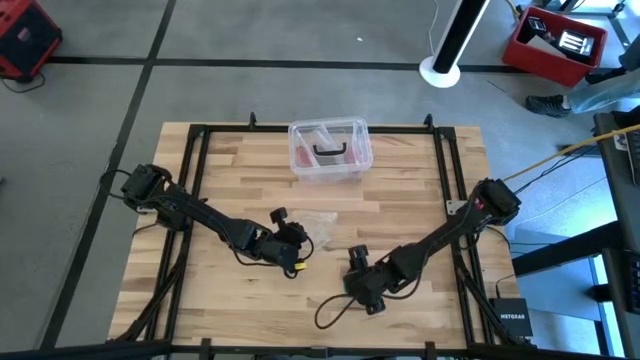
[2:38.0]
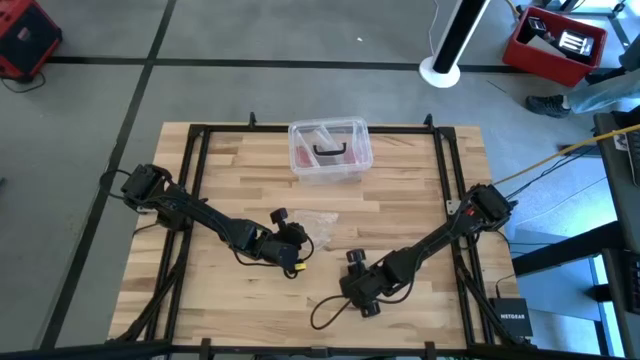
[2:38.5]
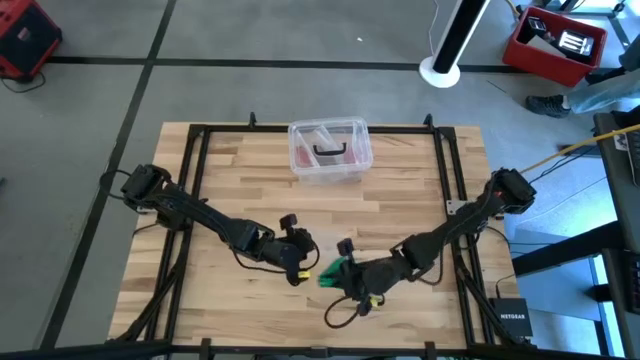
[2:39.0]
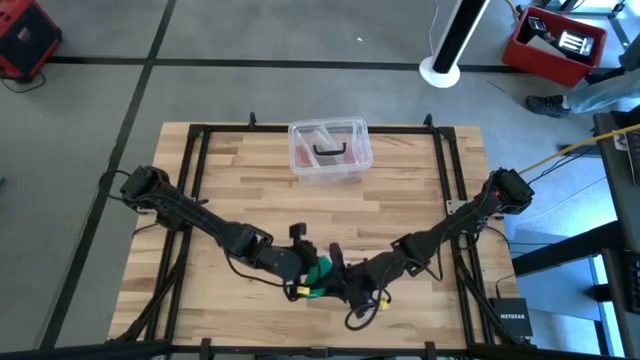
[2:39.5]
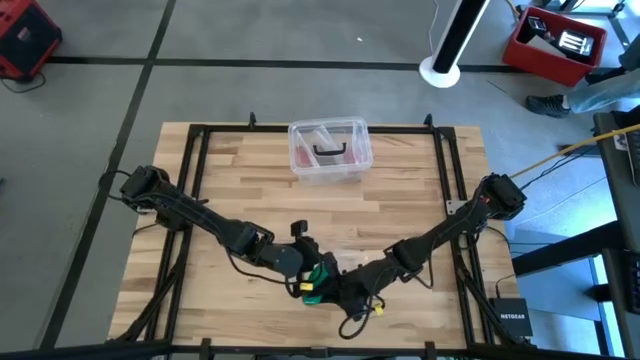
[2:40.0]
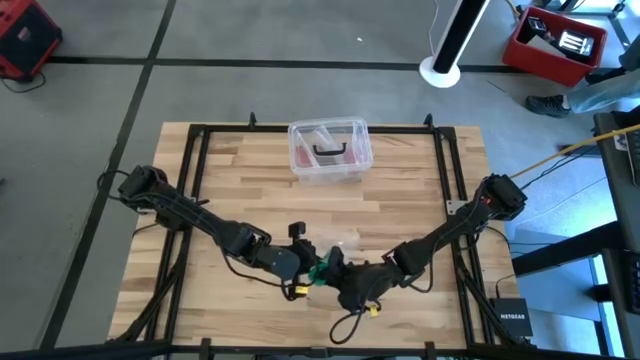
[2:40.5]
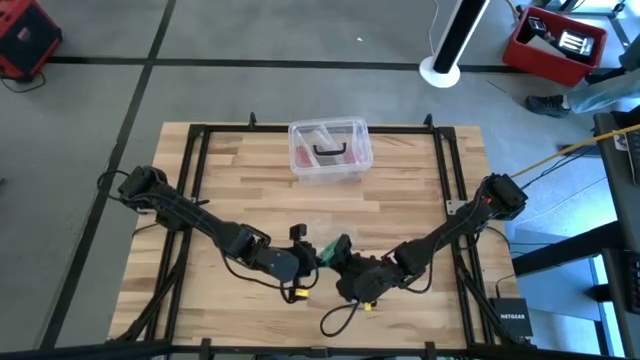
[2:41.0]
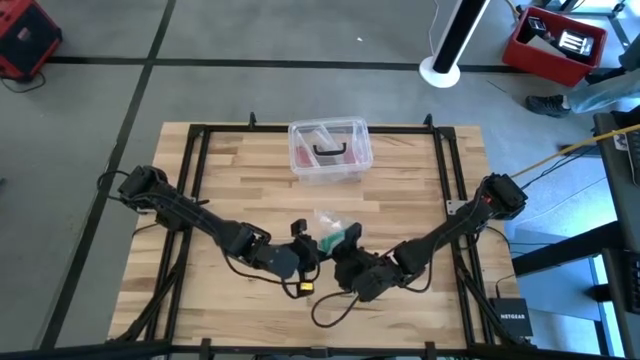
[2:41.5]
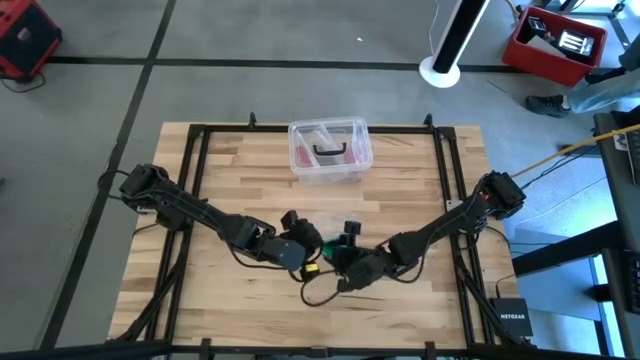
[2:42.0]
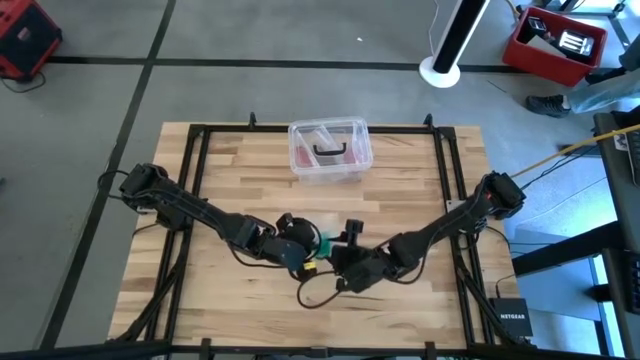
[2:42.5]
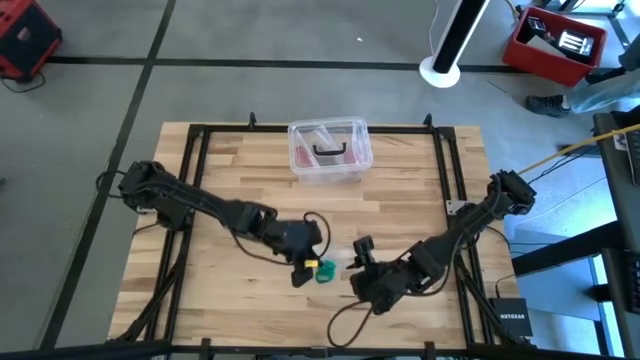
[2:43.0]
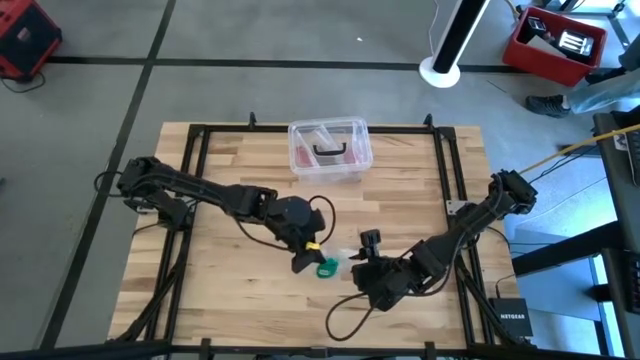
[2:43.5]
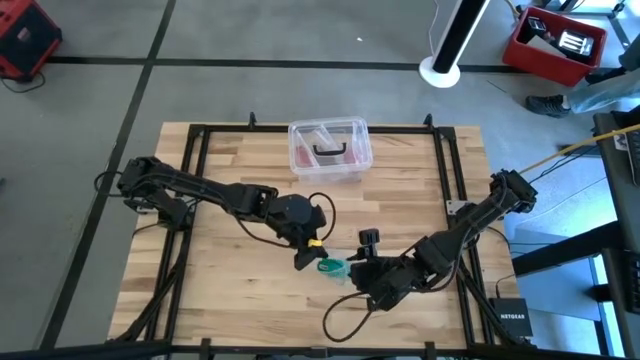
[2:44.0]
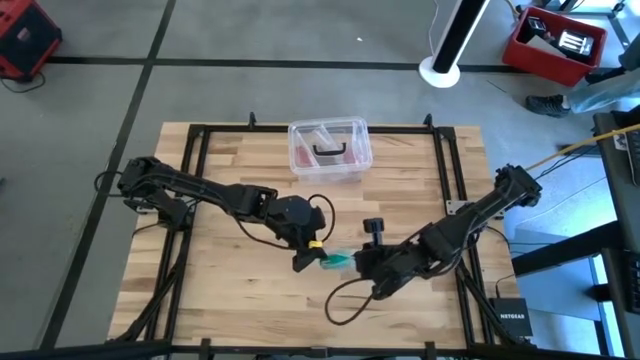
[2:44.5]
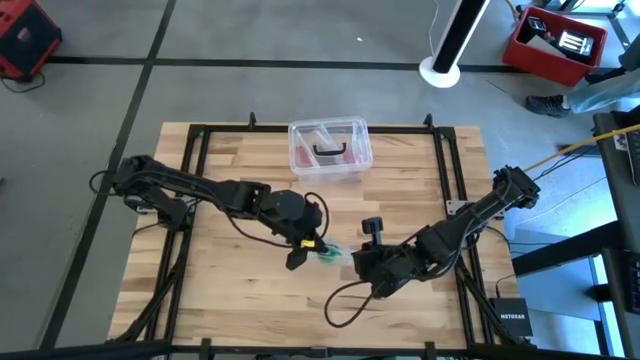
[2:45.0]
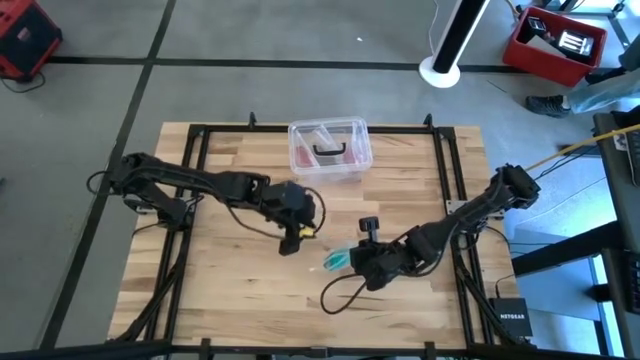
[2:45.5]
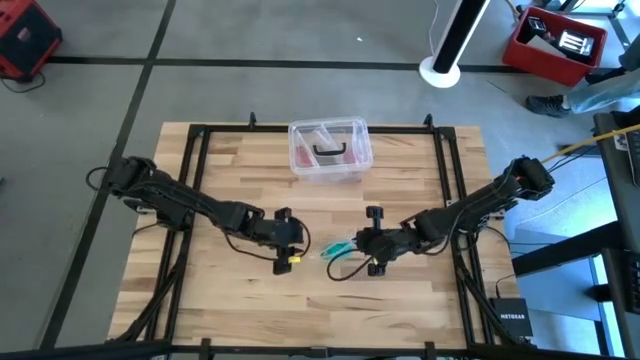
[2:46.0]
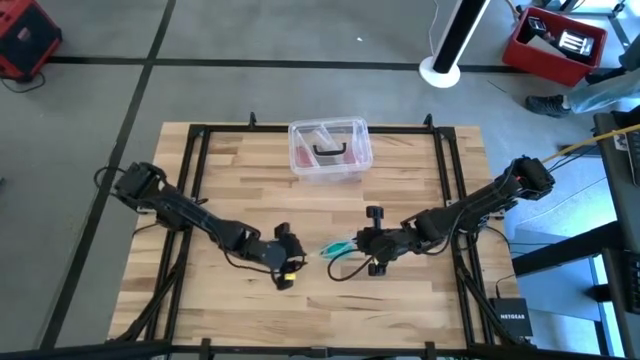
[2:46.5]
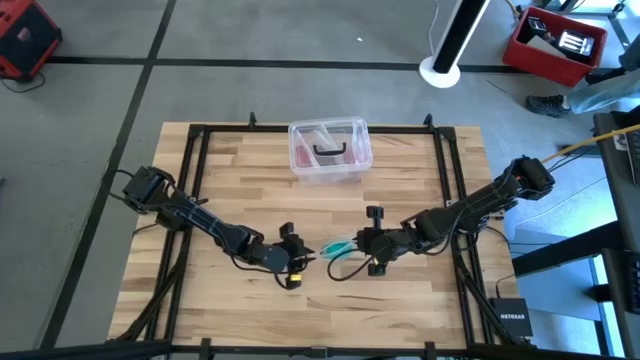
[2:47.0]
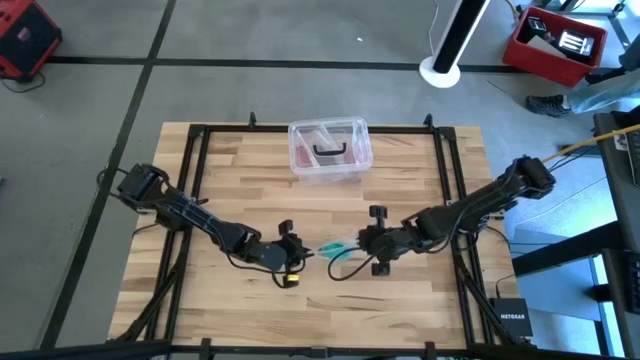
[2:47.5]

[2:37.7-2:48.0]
Task: Roll bandage
Put the green bandage inside the transparent zip lock bag

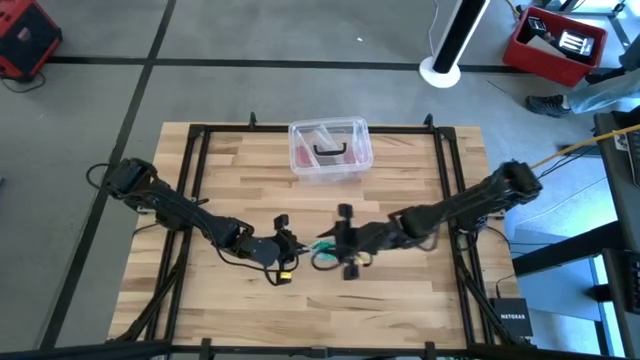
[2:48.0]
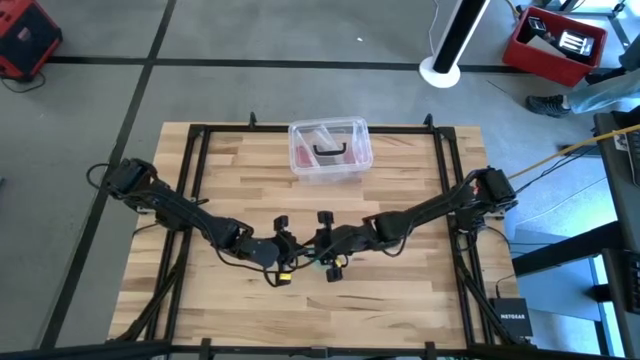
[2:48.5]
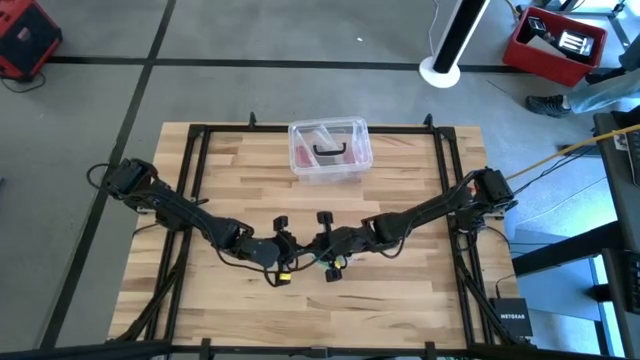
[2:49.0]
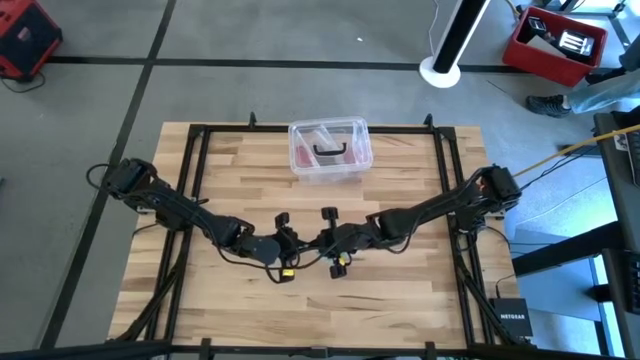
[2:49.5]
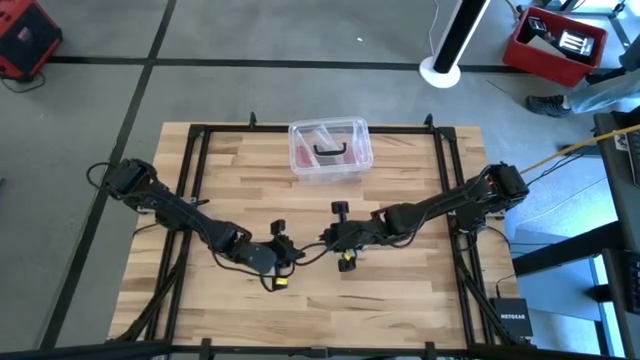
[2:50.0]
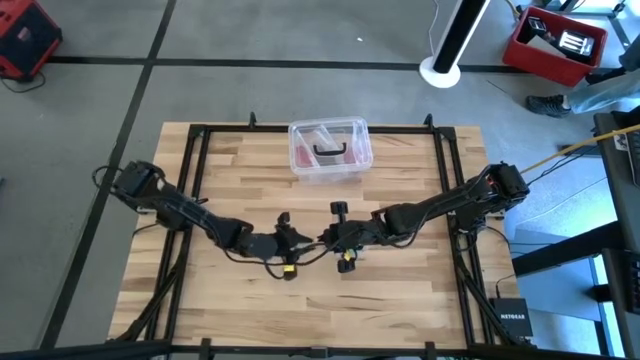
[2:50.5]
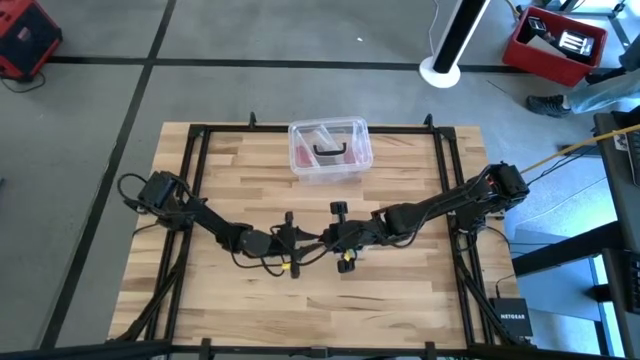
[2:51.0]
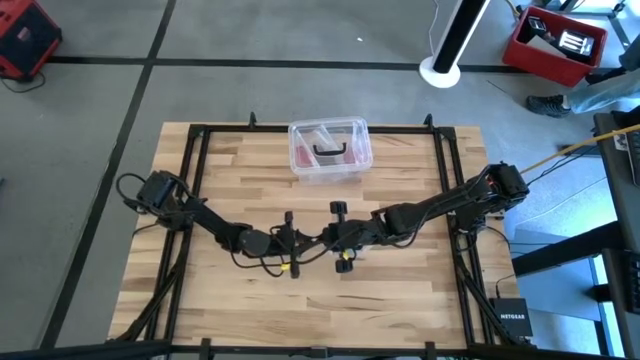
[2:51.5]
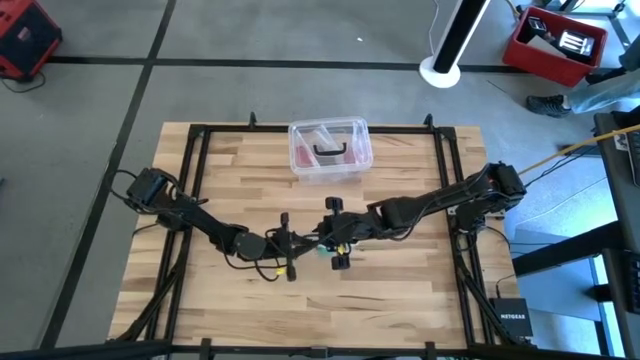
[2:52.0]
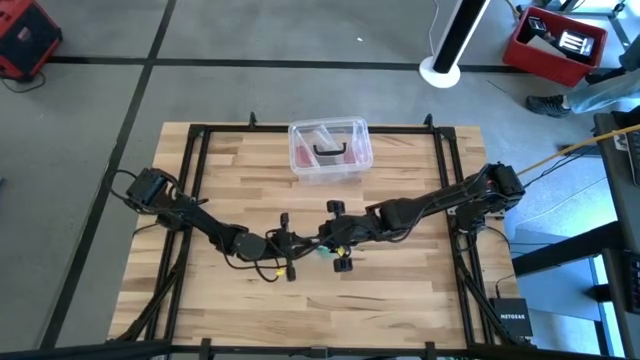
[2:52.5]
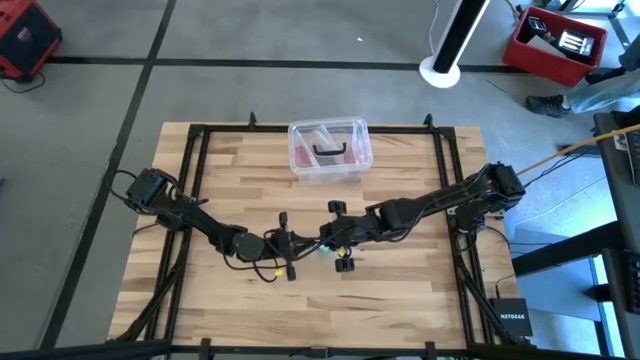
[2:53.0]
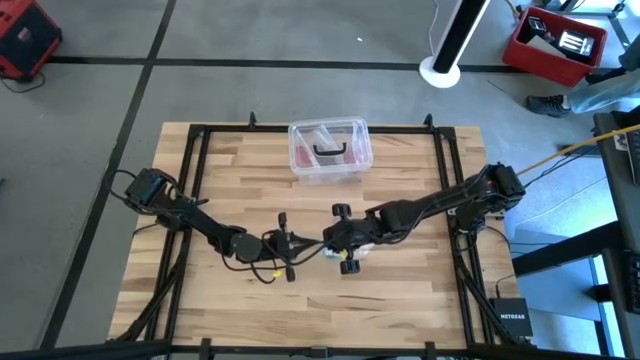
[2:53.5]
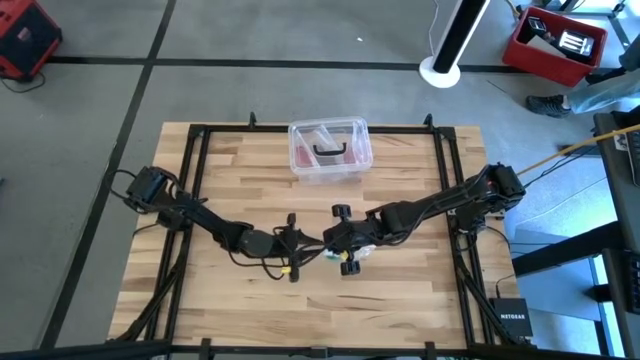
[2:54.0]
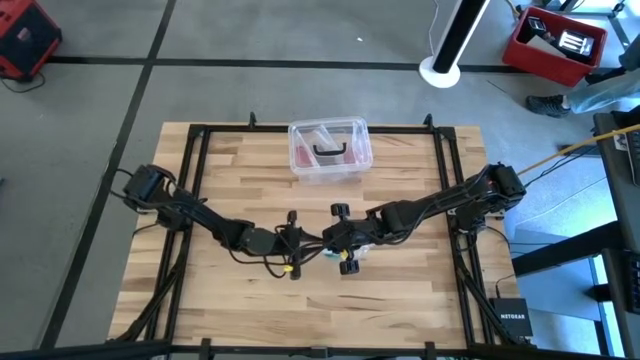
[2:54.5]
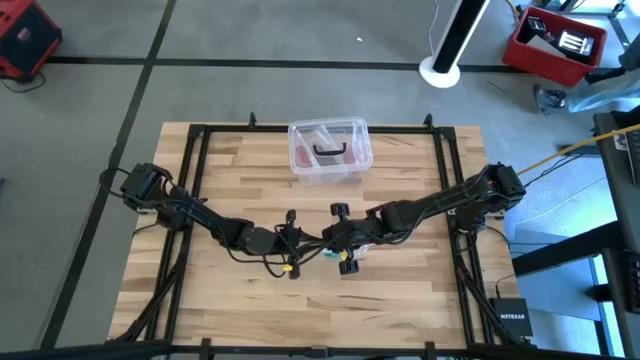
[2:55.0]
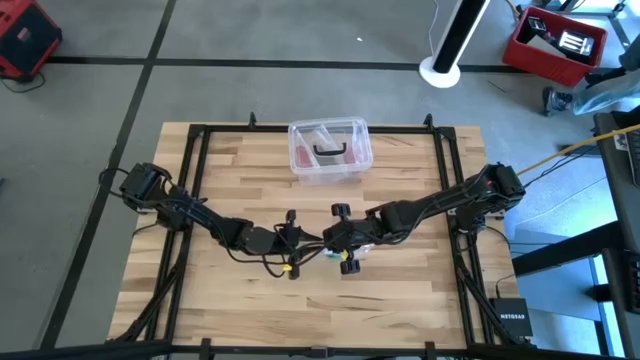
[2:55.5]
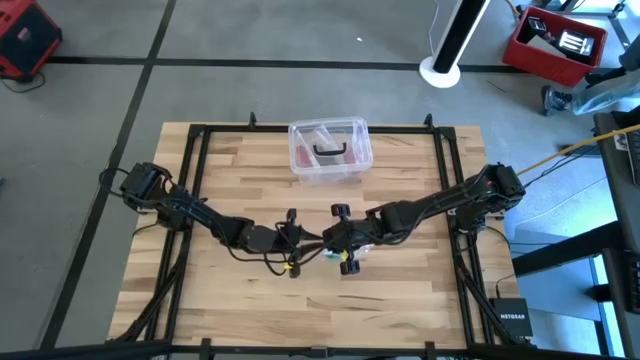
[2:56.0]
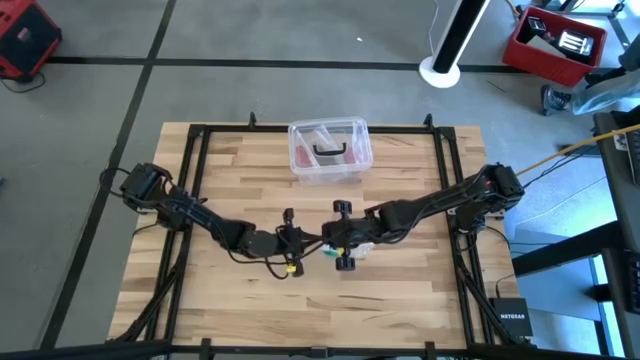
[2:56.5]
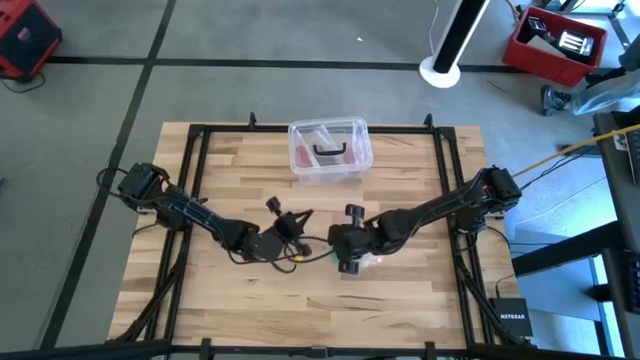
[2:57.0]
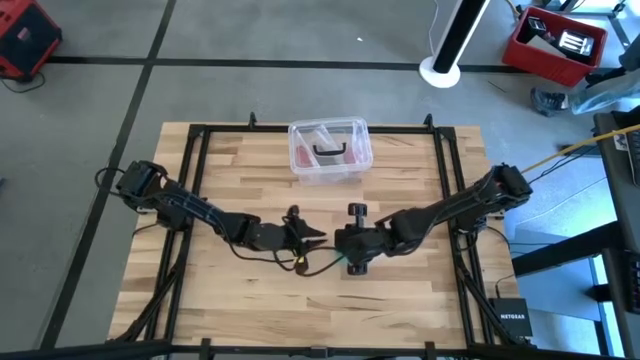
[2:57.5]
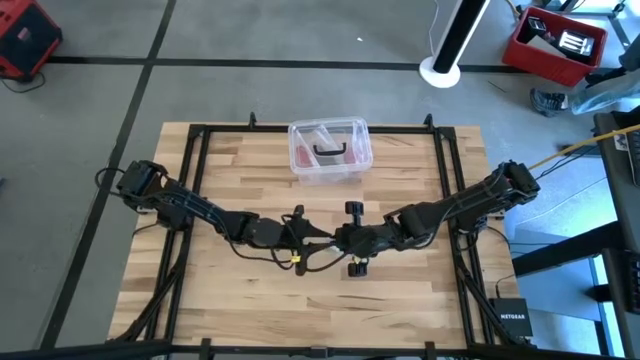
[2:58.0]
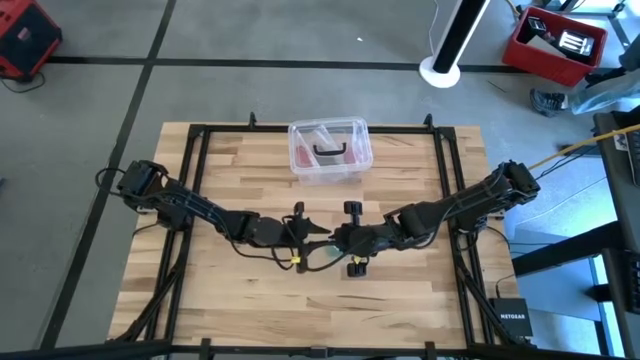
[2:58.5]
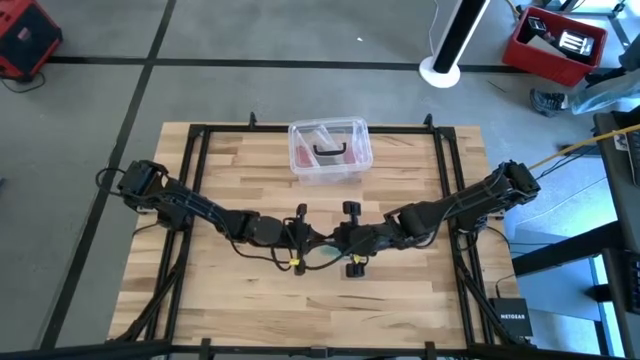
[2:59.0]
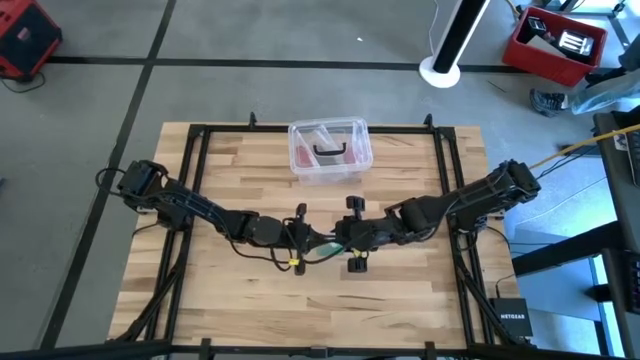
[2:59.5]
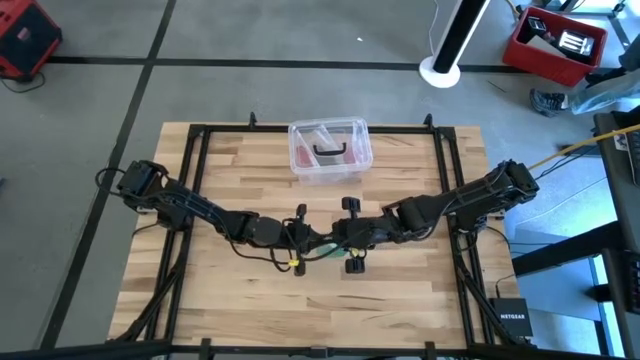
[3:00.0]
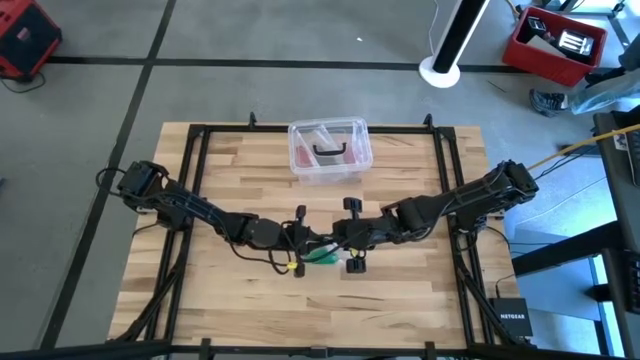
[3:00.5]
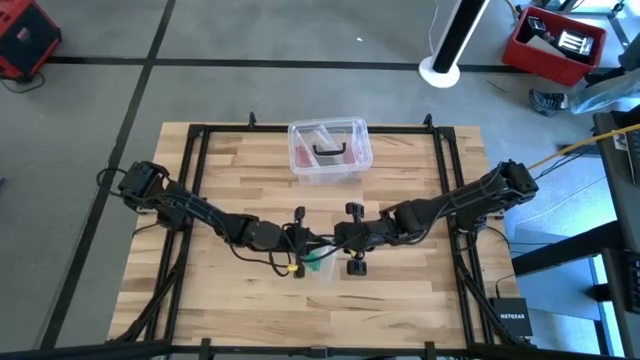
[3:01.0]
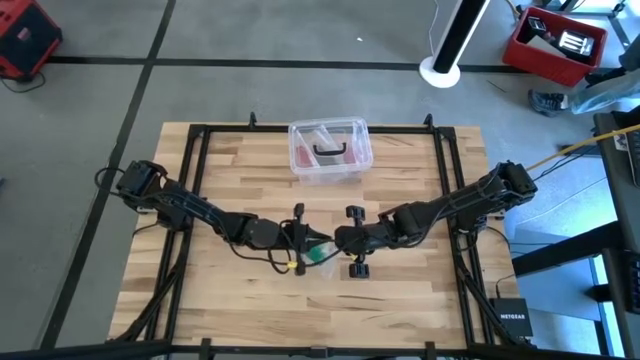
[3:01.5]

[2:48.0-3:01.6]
Close the transparent zip lock bag
